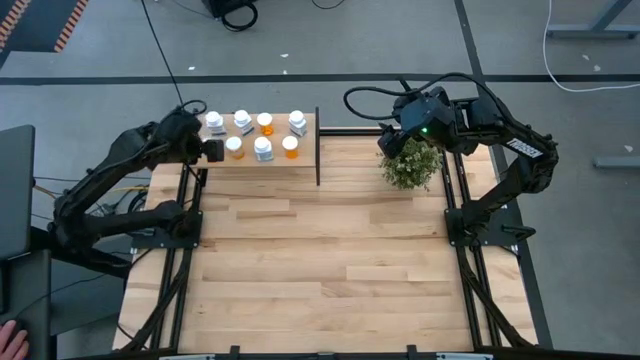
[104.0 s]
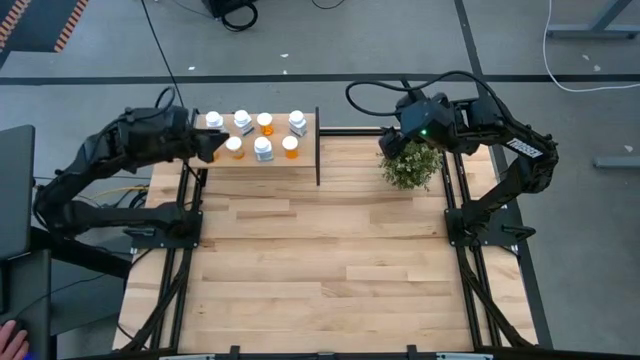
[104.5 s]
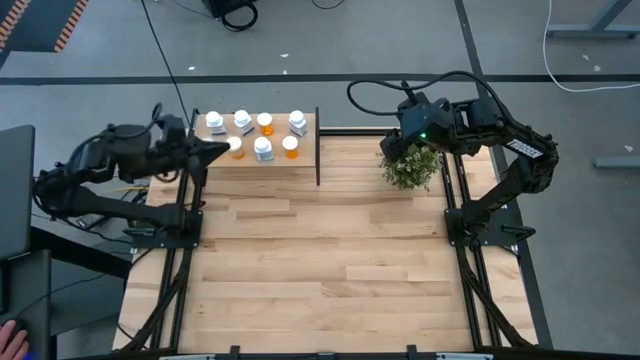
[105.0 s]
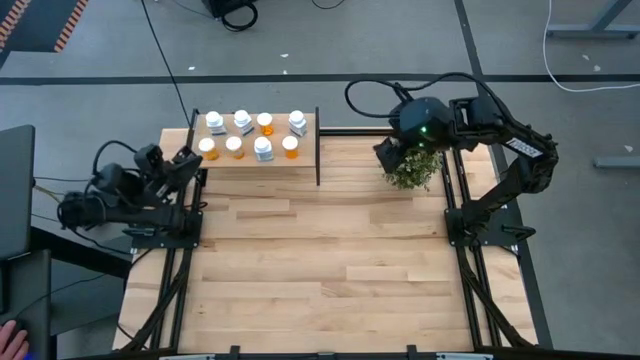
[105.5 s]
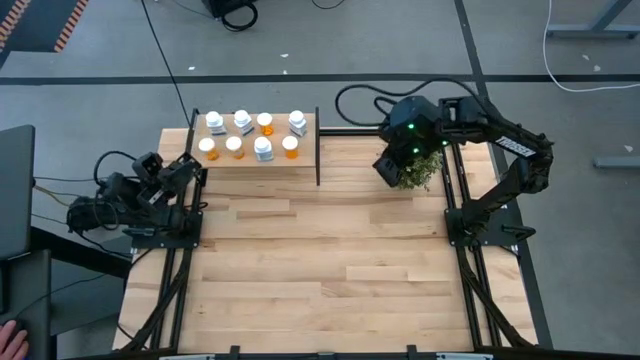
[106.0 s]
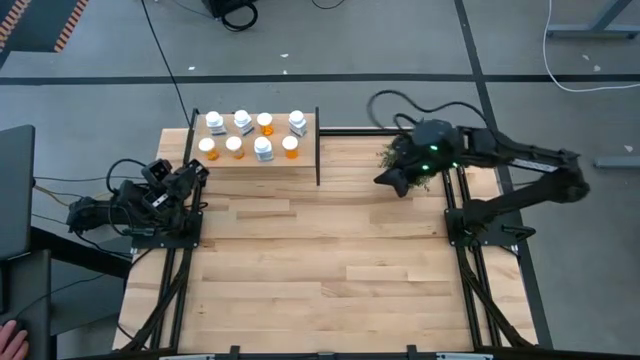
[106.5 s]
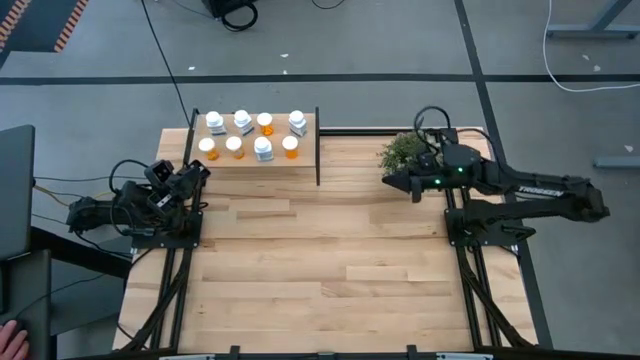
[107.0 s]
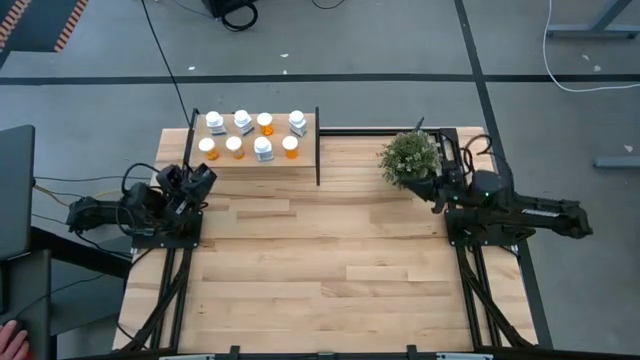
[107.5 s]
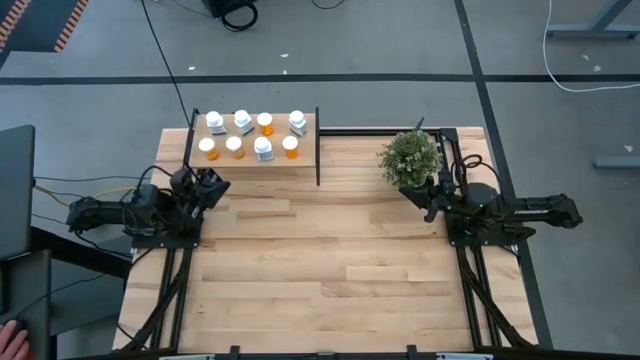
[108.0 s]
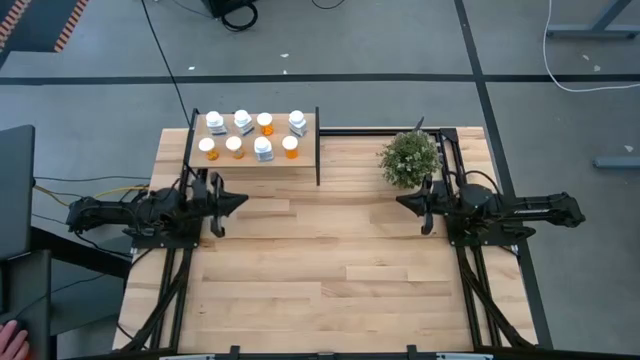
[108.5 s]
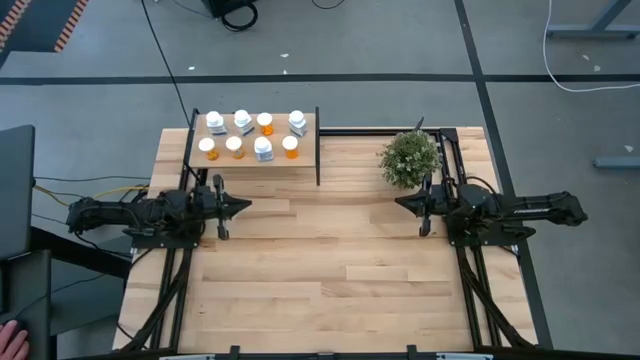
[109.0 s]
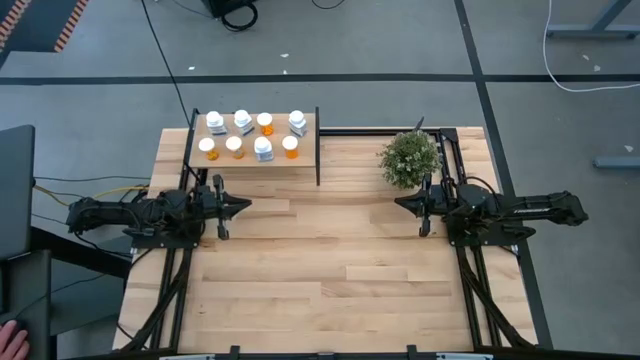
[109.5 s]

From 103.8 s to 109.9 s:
Task: Pick and place medicine bottles onto shelf by color
Return to Home Position

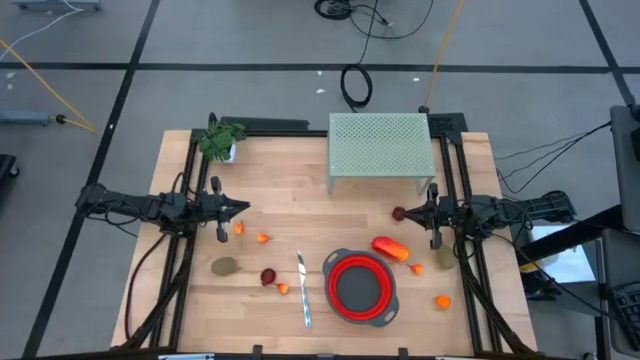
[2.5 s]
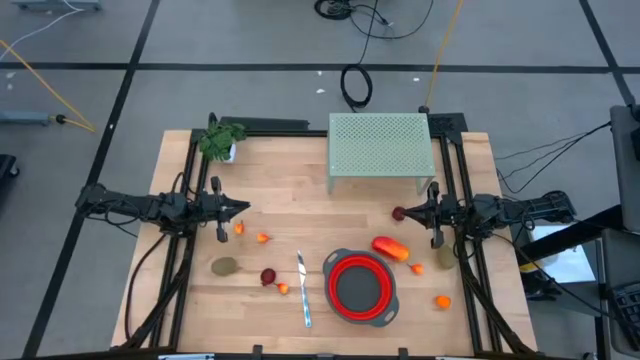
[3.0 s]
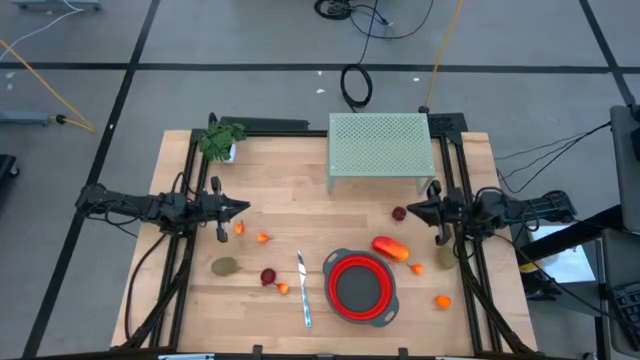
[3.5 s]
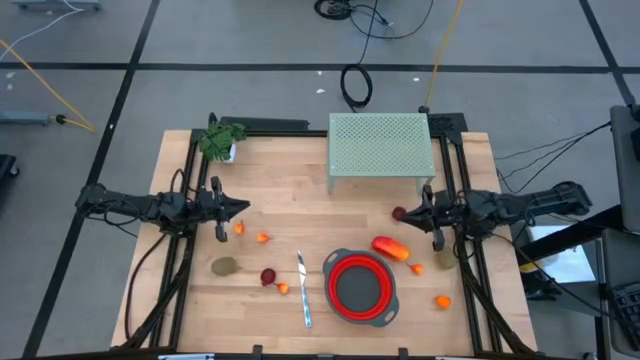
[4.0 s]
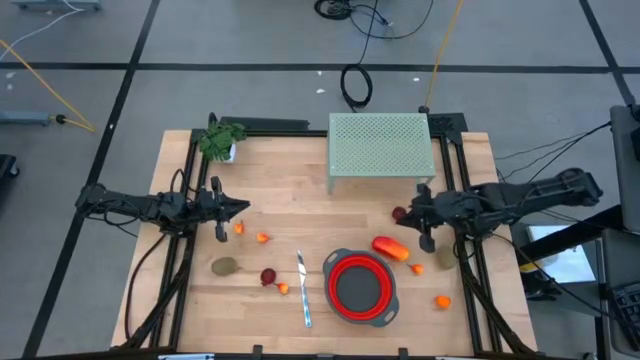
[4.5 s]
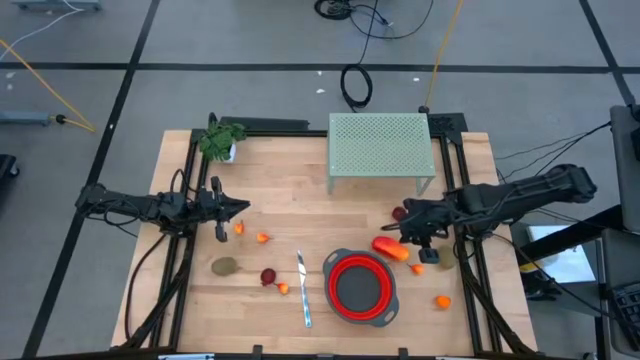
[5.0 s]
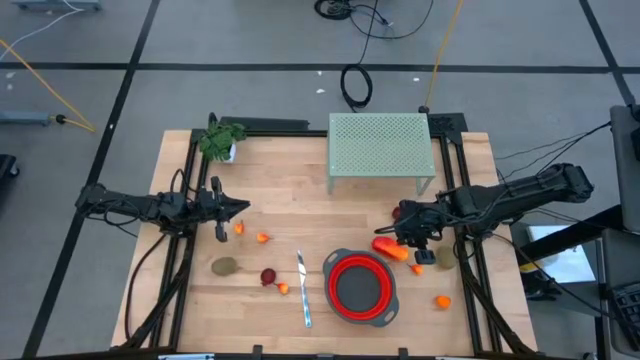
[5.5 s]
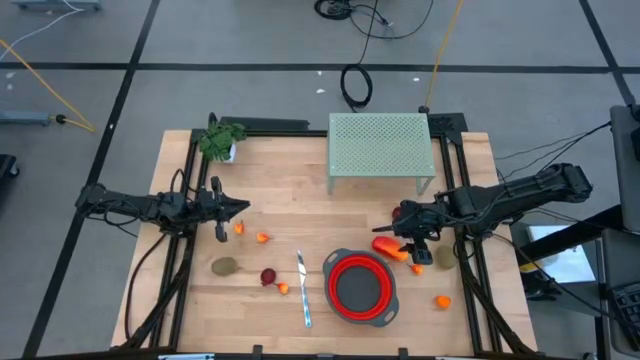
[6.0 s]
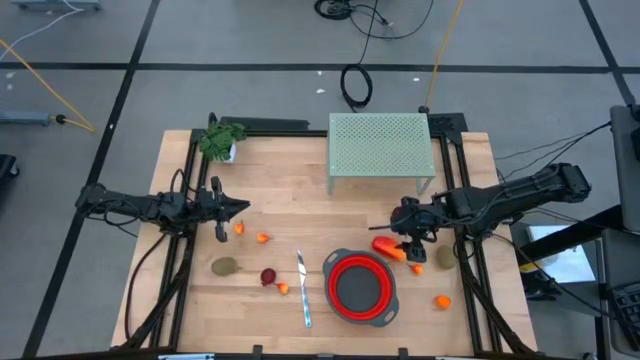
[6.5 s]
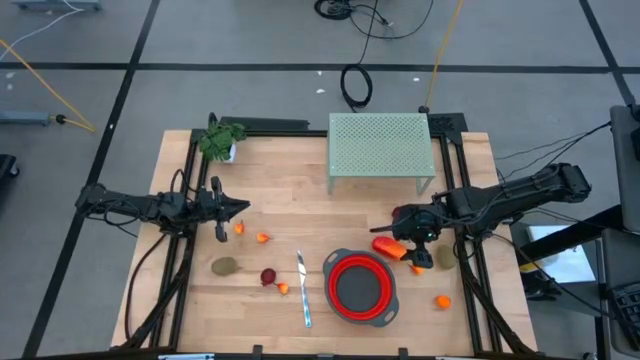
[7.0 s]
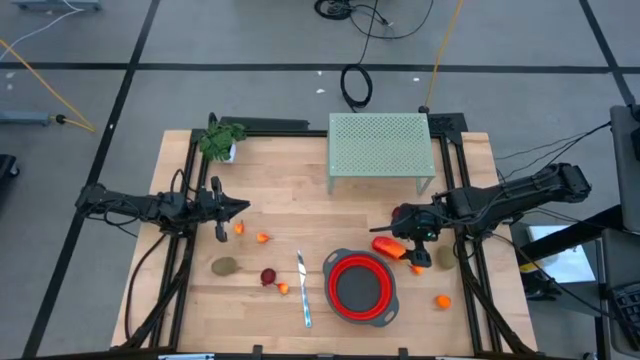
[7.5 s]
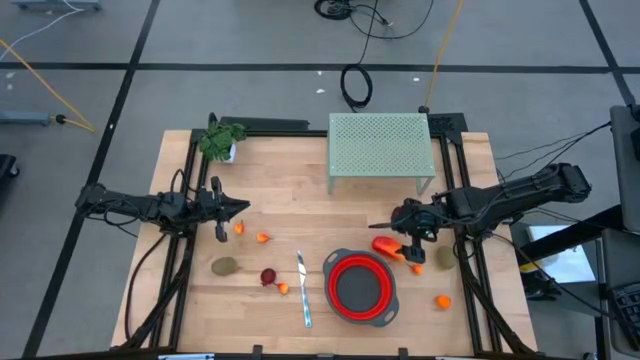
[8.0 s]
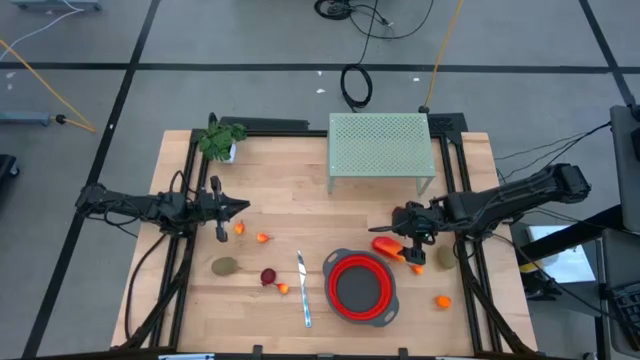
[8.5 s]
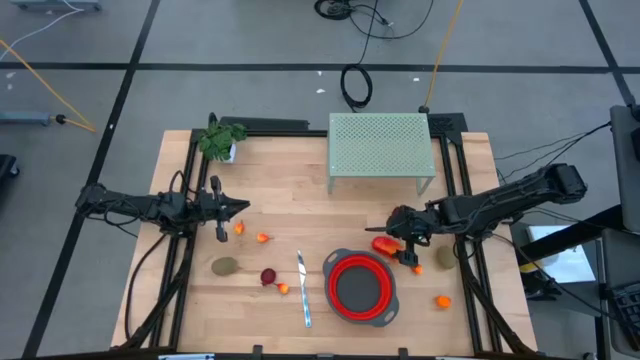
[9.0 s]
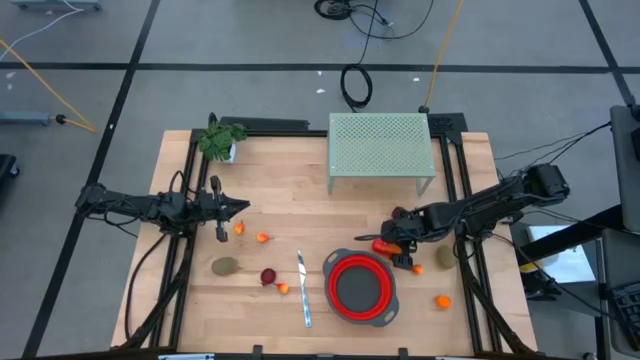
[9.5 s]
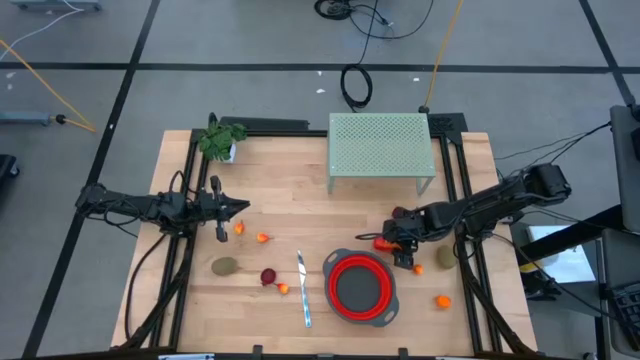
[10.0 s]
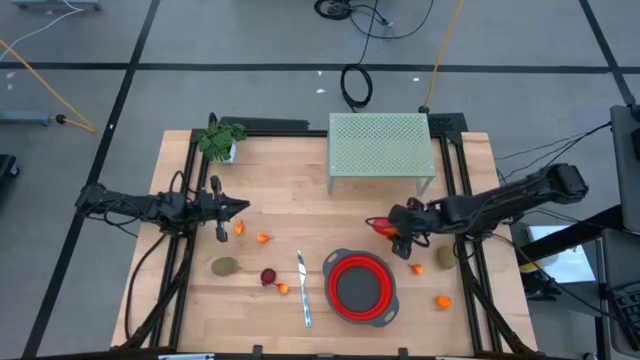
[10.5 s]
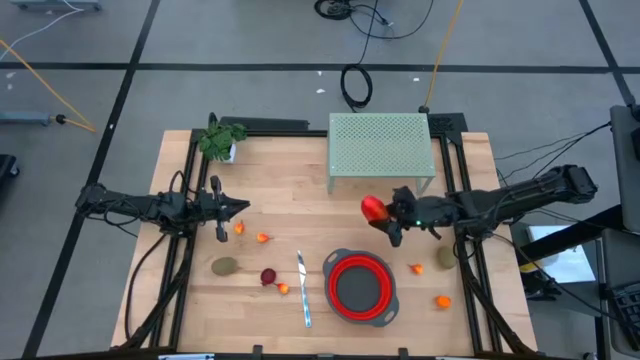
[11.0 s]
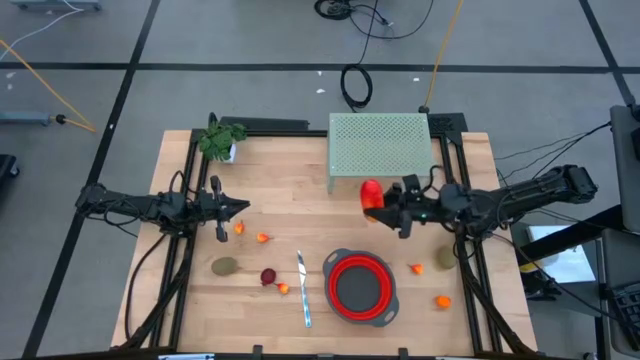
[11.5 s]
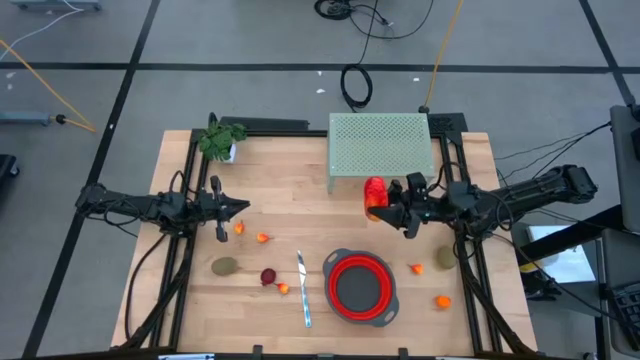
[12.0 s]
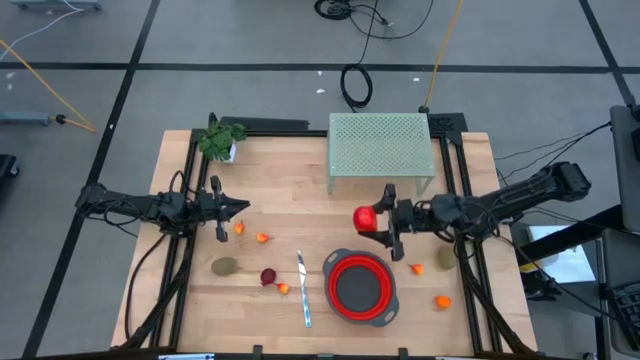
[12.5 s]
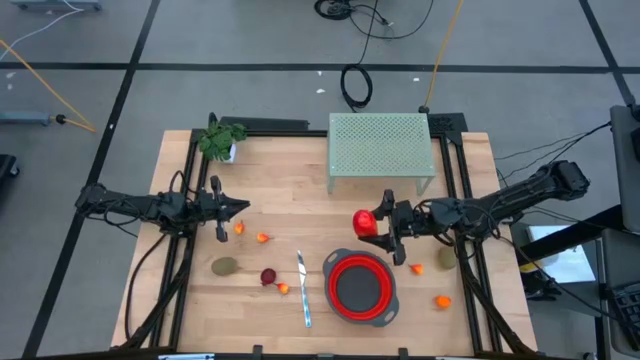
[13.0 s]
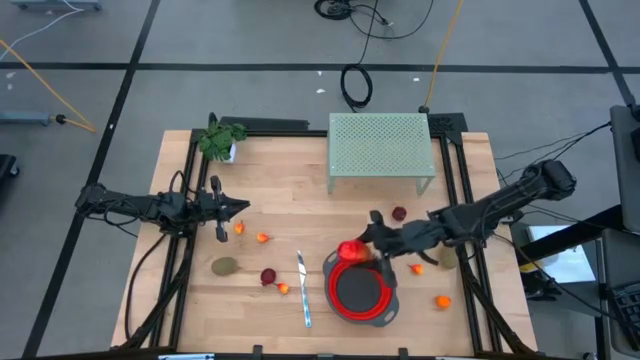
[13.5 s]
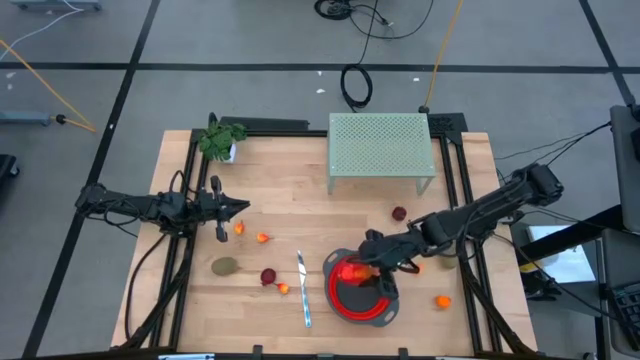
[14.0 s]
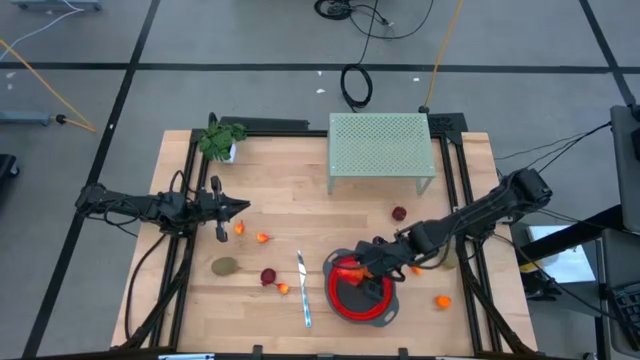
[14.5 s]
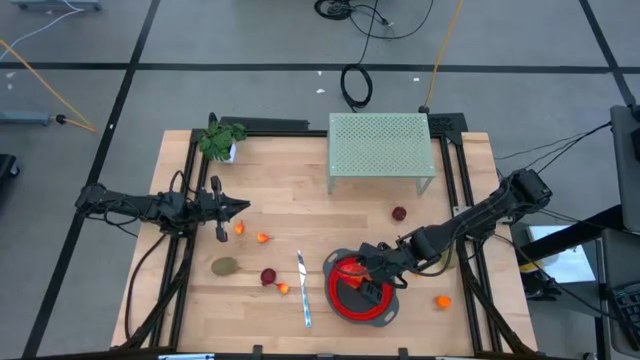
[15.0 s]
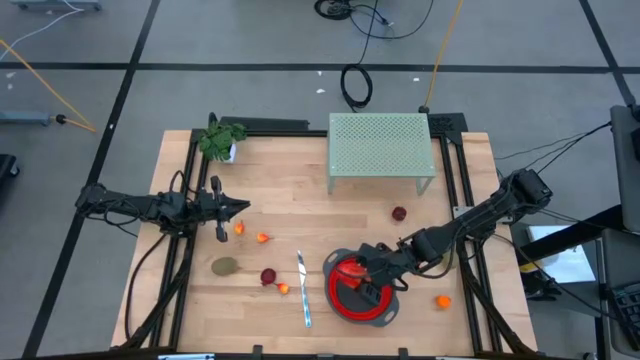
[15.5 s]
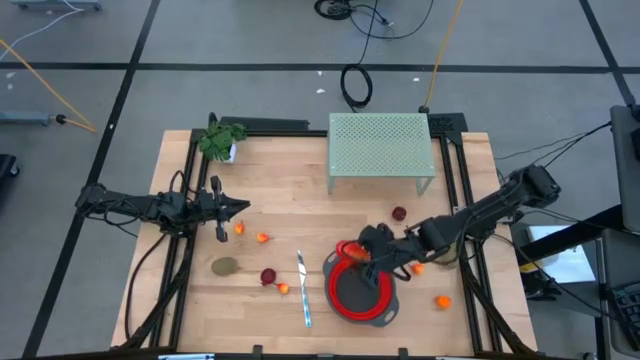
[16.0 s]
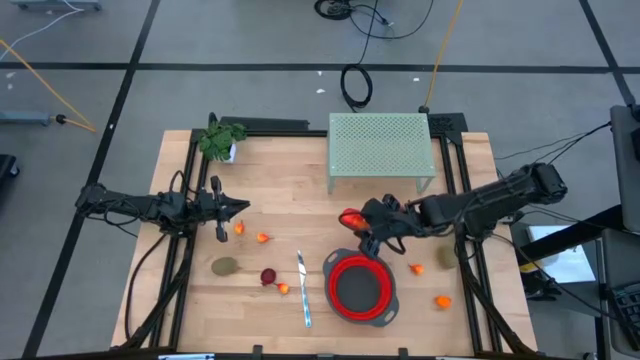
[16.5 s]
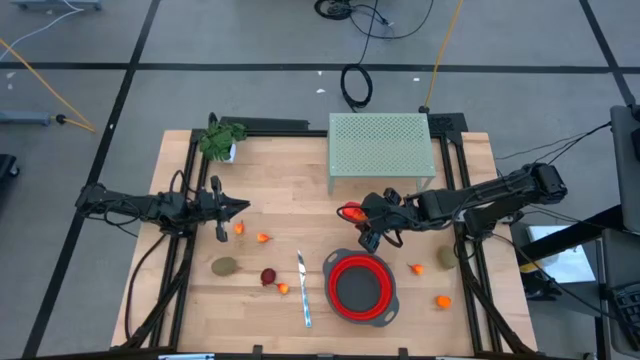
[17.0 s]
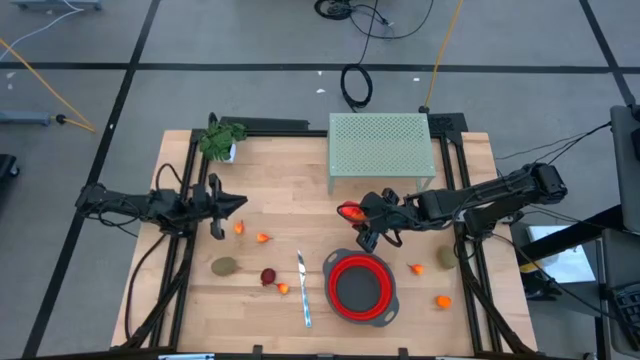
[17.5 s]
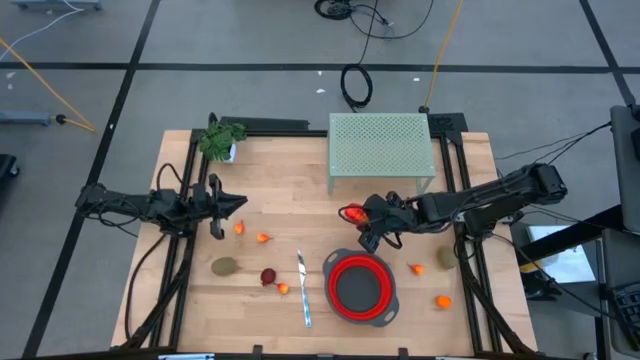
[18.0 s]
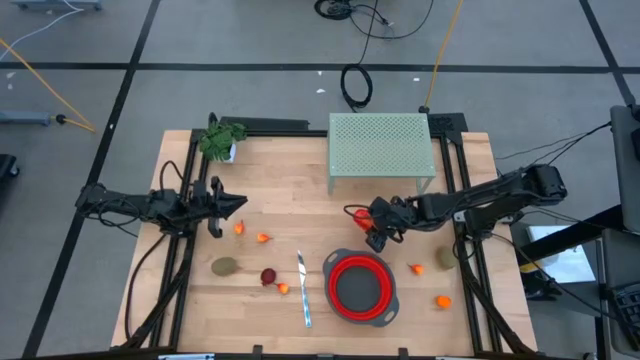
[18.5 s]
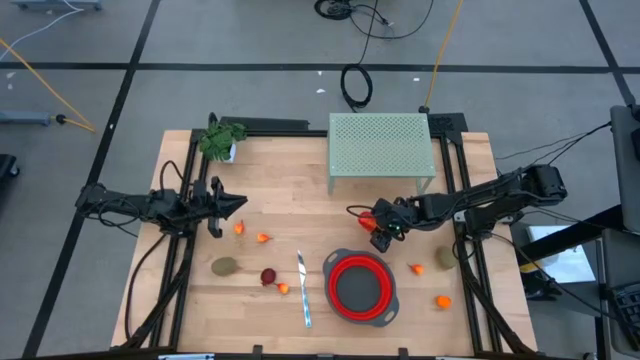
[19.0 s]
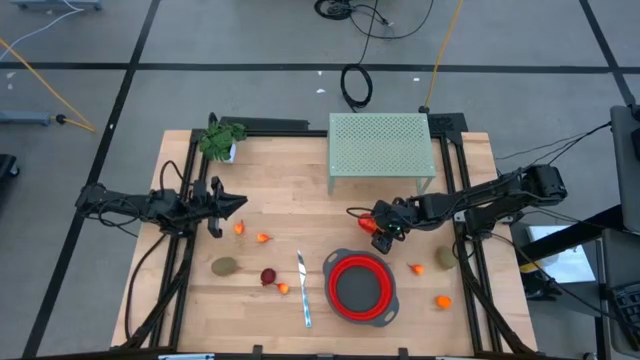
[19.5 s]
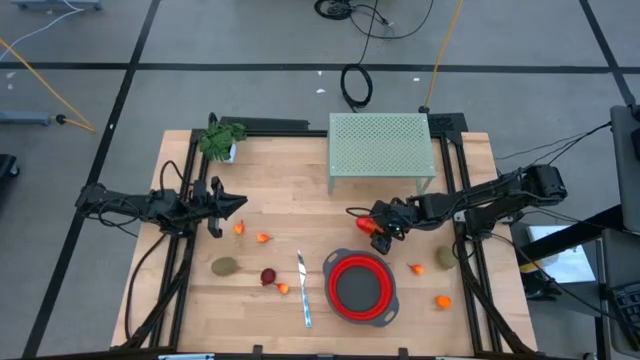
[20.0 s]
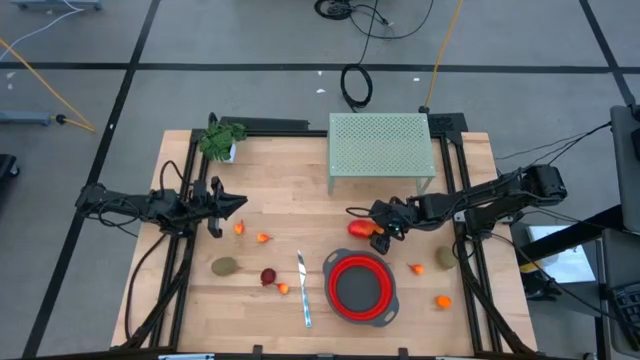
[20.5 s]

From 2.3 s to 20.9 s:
Task: Pick & Place Fruit
Put the mango into the red strainer bowl
